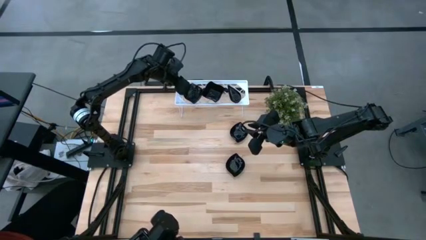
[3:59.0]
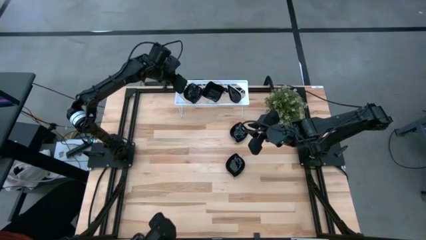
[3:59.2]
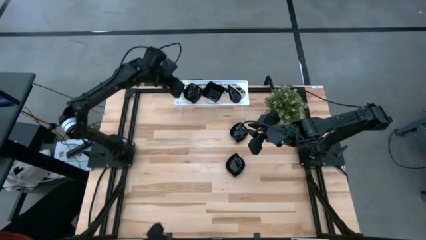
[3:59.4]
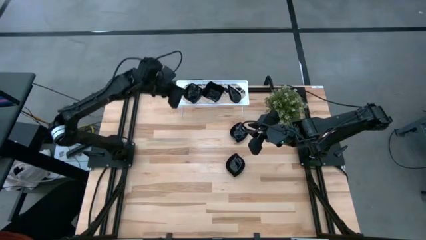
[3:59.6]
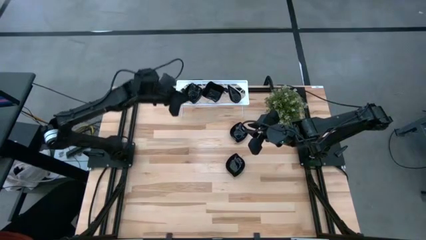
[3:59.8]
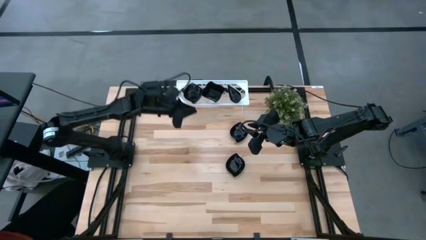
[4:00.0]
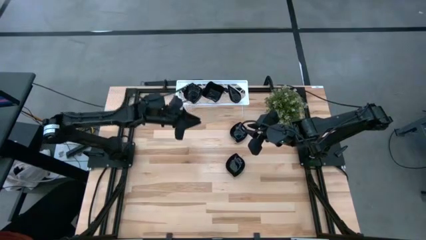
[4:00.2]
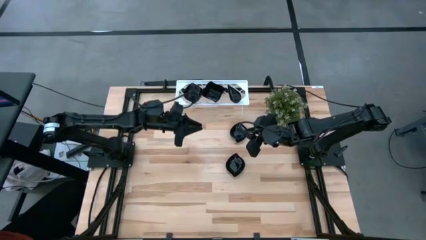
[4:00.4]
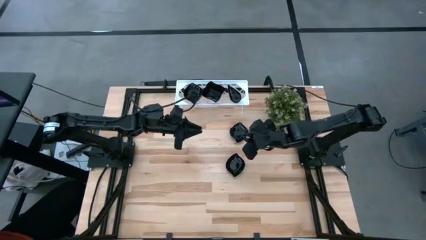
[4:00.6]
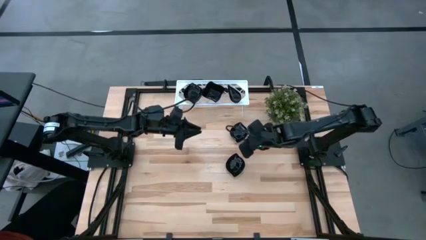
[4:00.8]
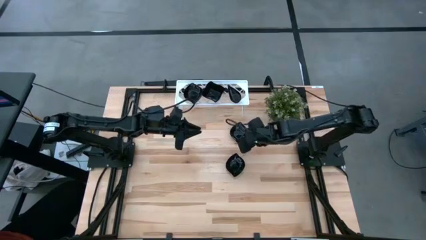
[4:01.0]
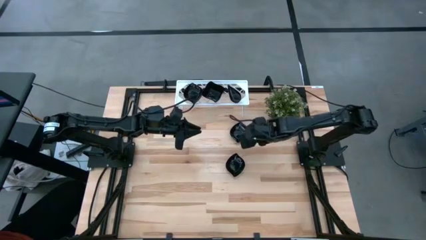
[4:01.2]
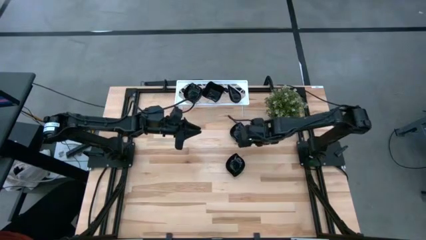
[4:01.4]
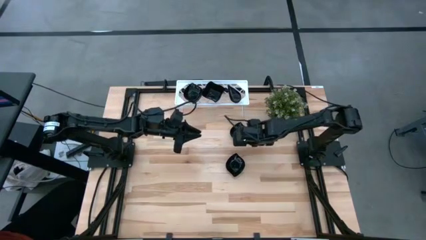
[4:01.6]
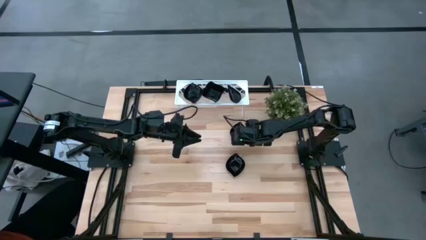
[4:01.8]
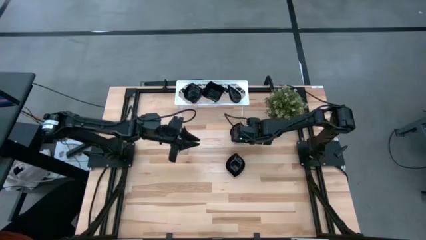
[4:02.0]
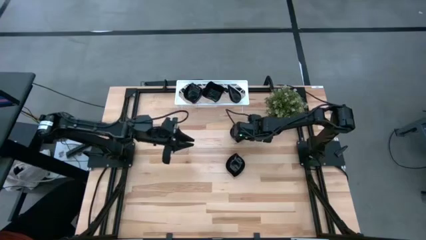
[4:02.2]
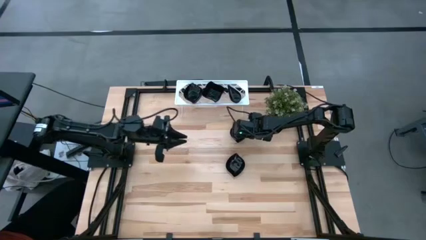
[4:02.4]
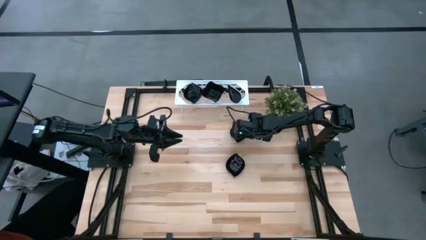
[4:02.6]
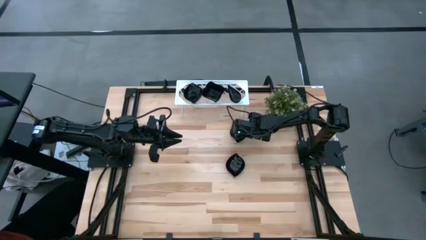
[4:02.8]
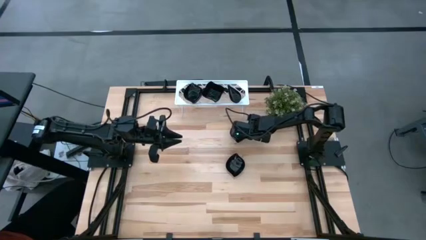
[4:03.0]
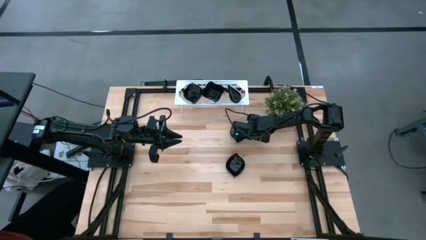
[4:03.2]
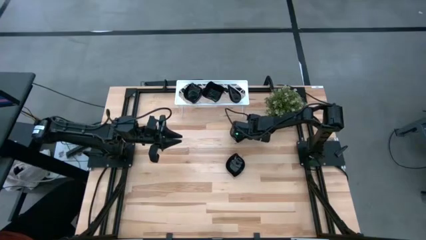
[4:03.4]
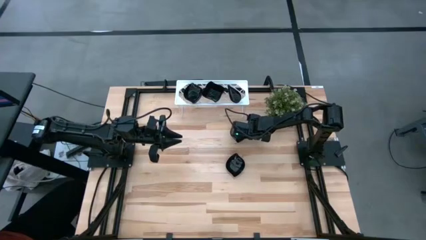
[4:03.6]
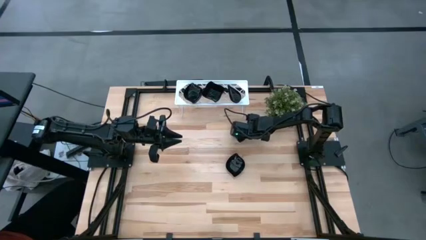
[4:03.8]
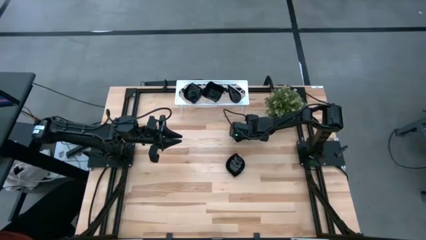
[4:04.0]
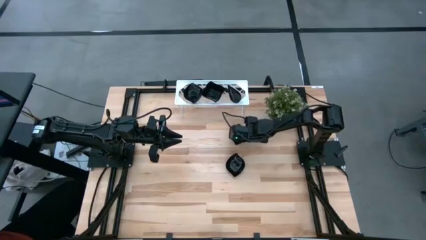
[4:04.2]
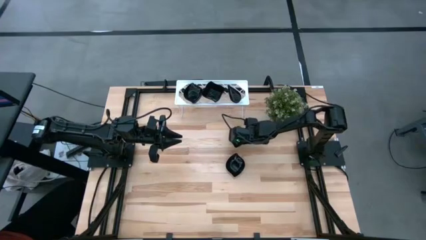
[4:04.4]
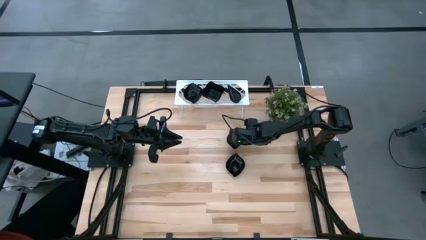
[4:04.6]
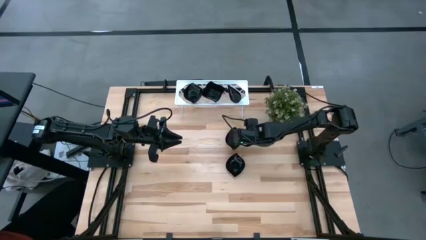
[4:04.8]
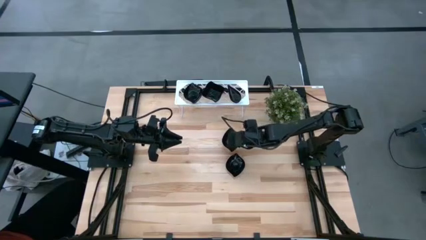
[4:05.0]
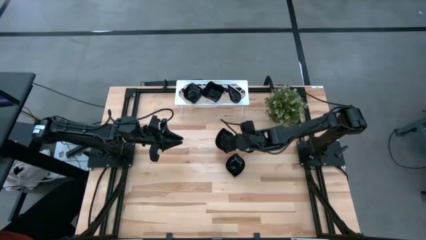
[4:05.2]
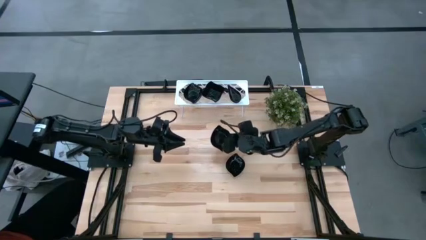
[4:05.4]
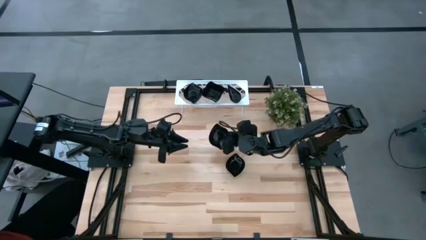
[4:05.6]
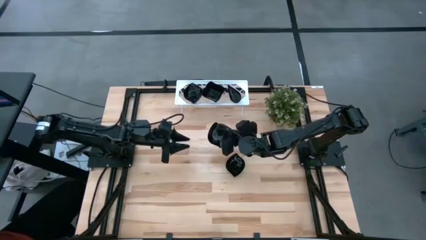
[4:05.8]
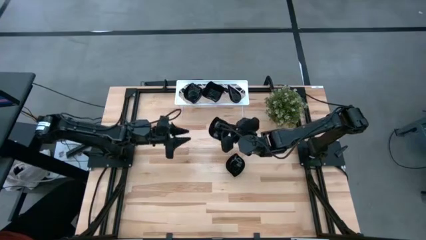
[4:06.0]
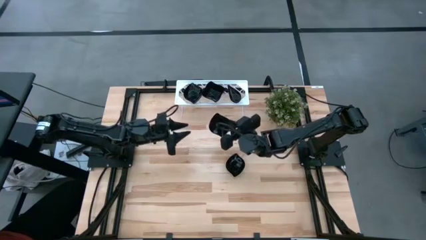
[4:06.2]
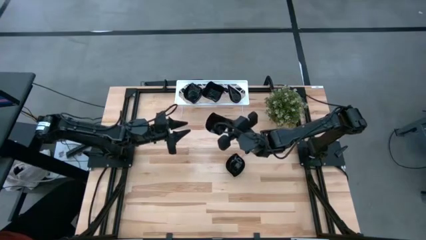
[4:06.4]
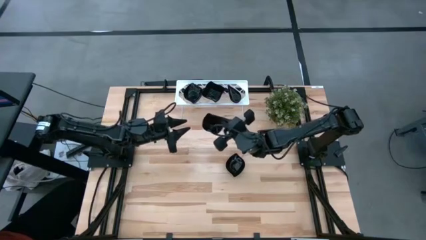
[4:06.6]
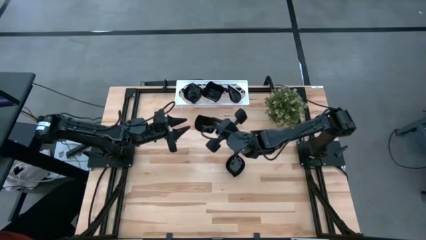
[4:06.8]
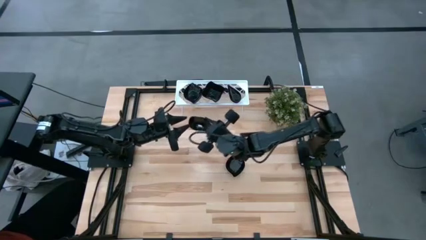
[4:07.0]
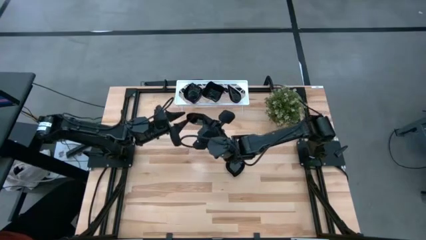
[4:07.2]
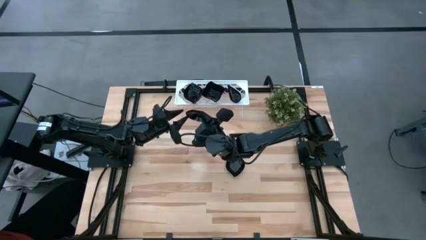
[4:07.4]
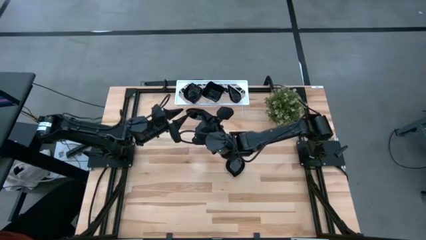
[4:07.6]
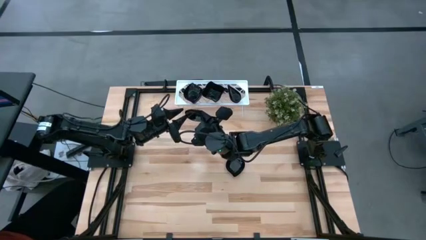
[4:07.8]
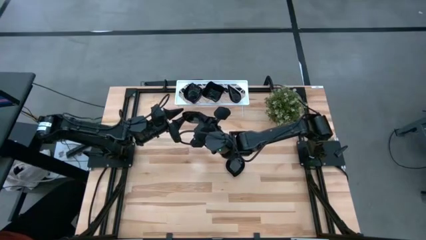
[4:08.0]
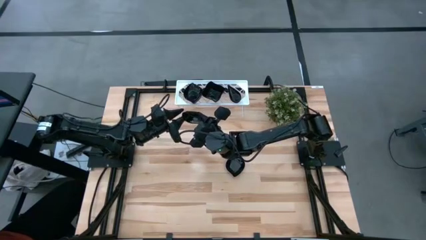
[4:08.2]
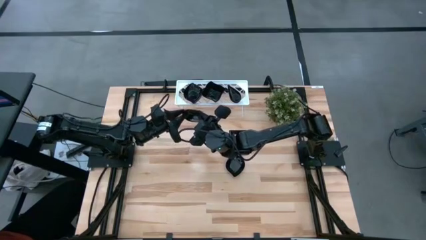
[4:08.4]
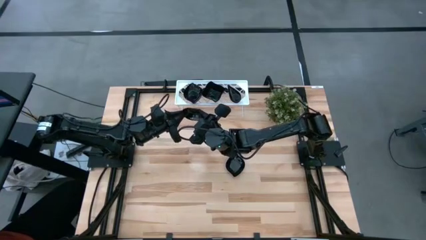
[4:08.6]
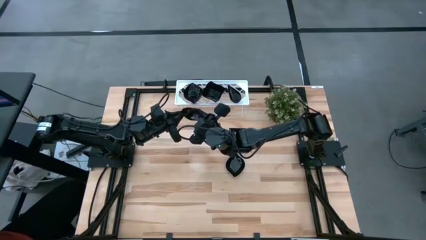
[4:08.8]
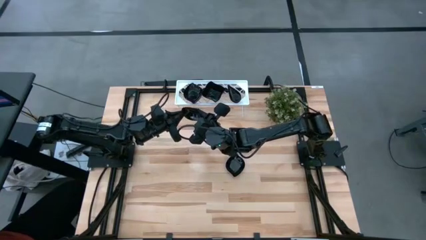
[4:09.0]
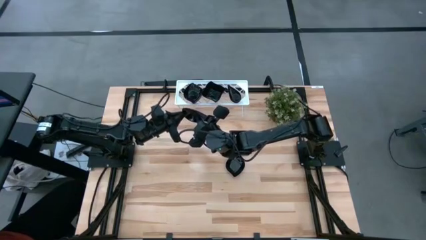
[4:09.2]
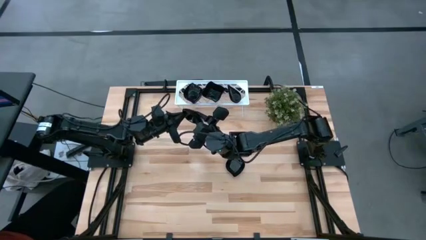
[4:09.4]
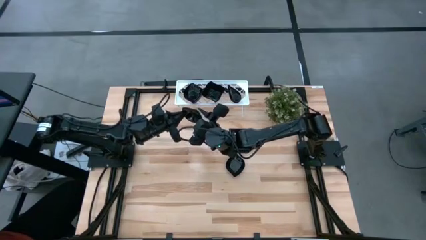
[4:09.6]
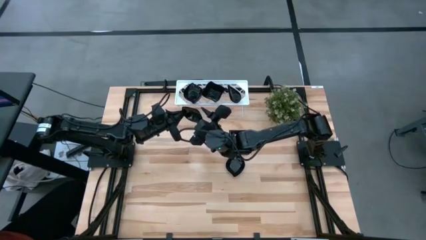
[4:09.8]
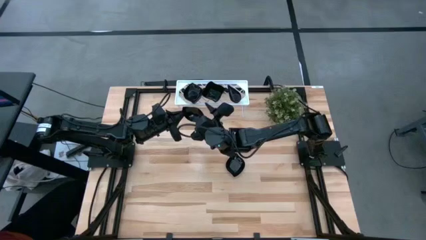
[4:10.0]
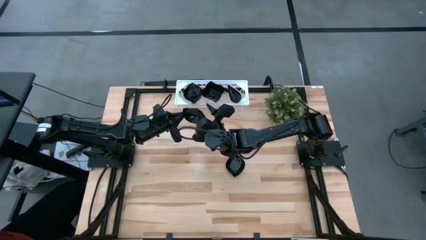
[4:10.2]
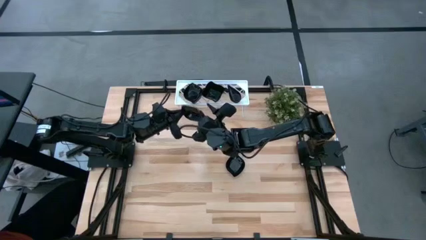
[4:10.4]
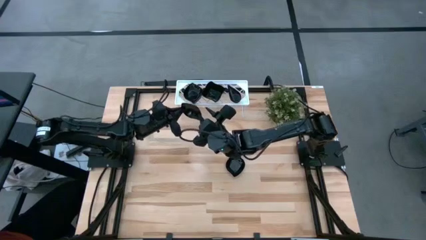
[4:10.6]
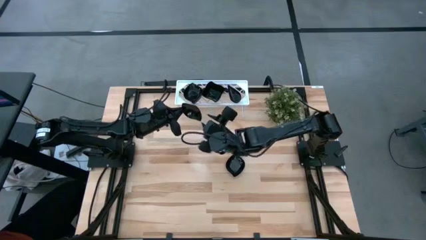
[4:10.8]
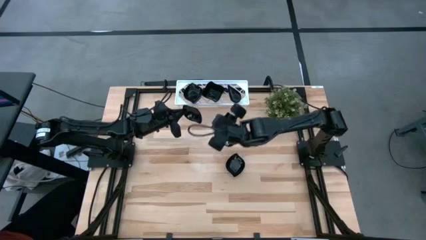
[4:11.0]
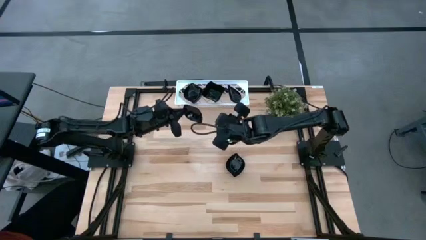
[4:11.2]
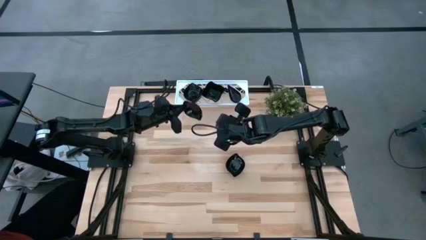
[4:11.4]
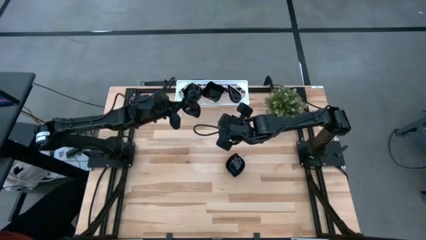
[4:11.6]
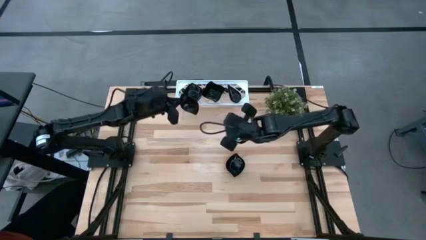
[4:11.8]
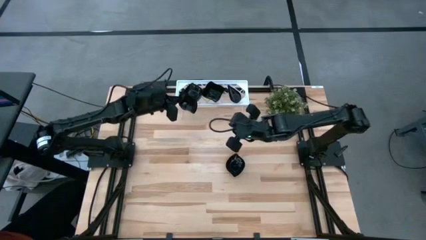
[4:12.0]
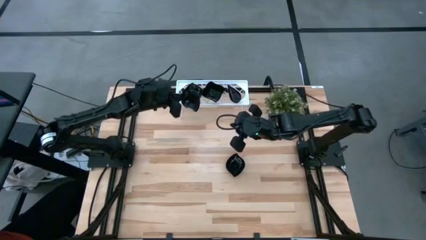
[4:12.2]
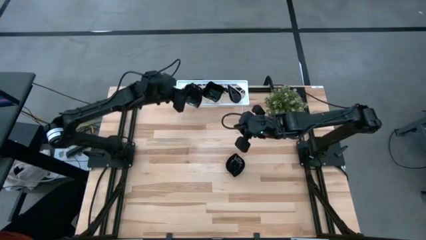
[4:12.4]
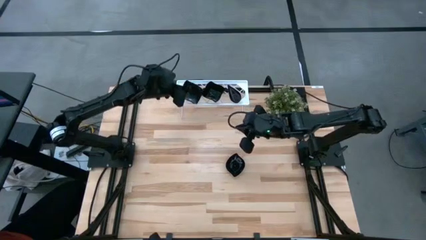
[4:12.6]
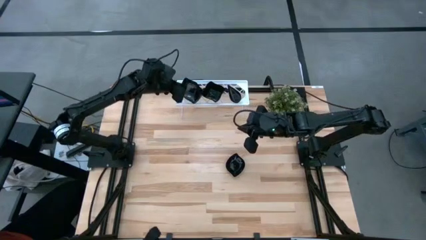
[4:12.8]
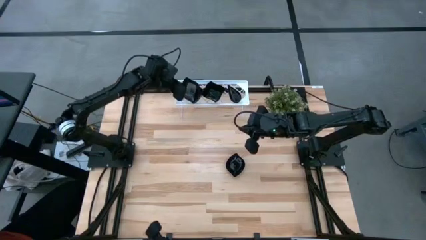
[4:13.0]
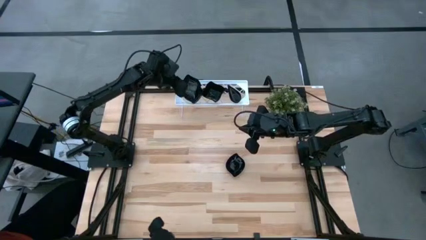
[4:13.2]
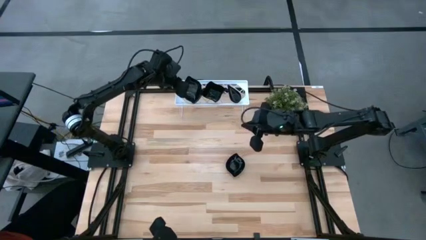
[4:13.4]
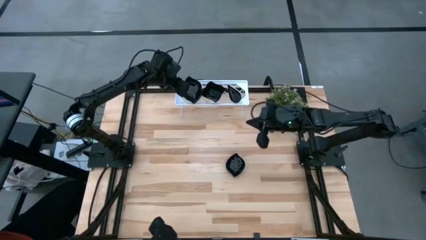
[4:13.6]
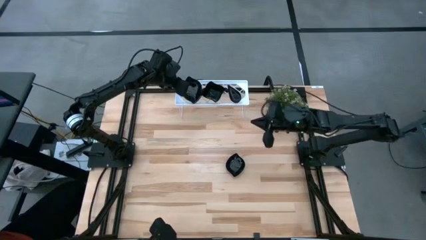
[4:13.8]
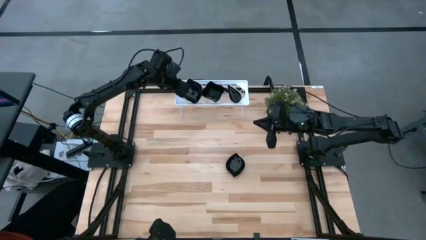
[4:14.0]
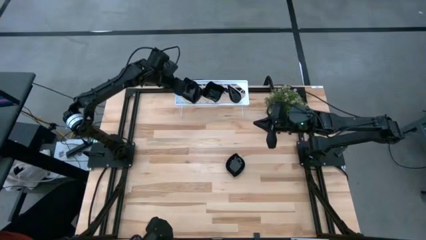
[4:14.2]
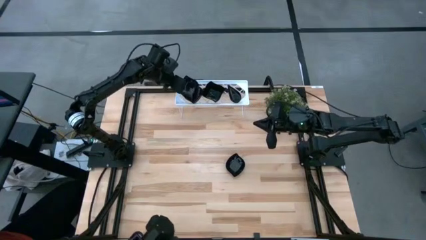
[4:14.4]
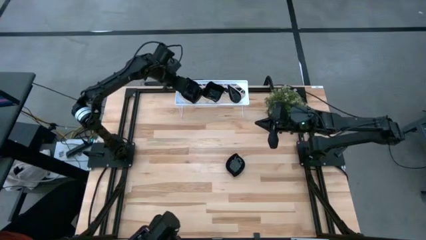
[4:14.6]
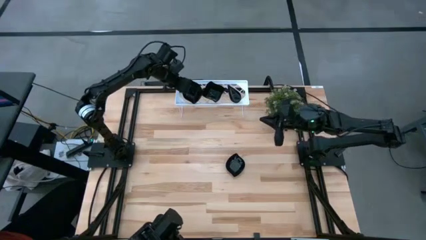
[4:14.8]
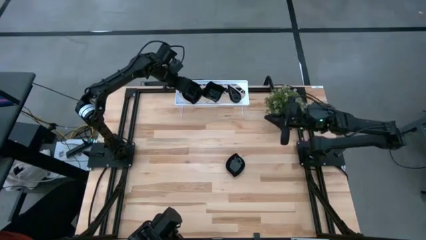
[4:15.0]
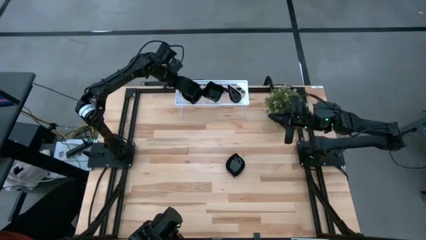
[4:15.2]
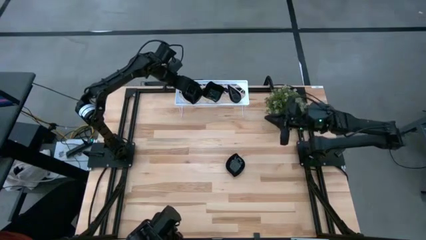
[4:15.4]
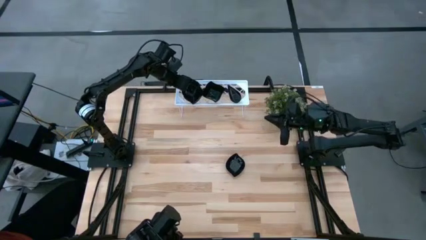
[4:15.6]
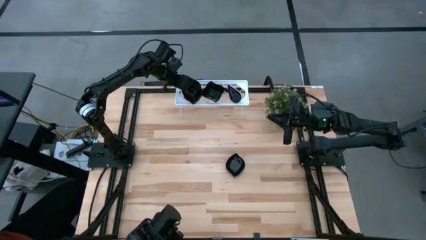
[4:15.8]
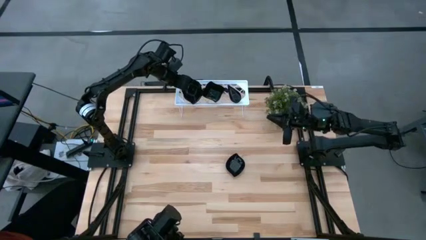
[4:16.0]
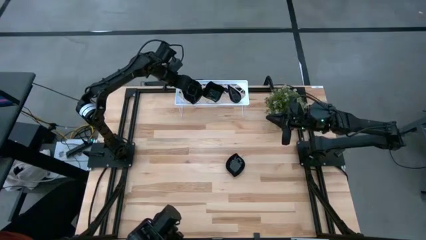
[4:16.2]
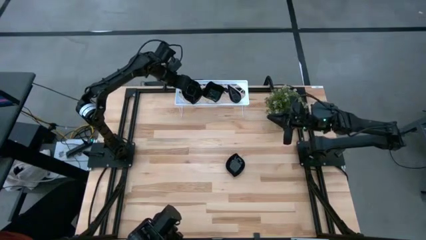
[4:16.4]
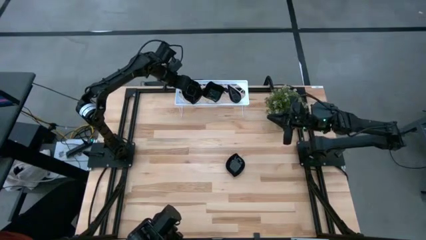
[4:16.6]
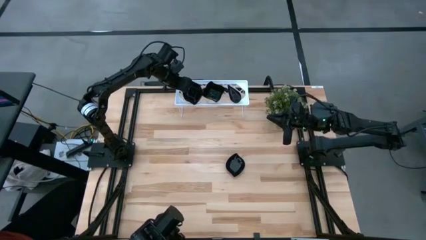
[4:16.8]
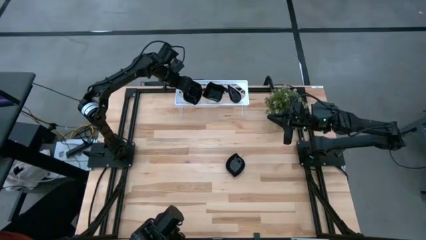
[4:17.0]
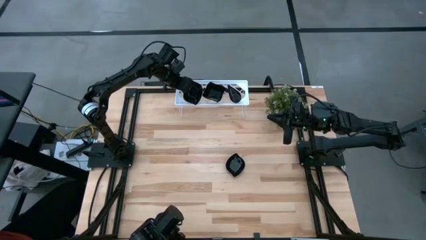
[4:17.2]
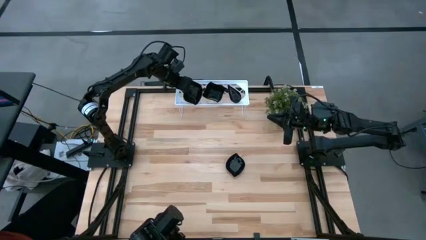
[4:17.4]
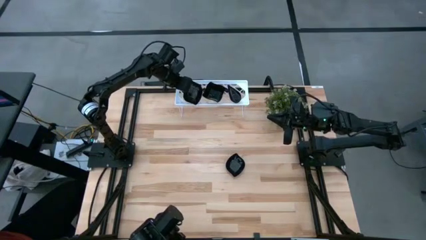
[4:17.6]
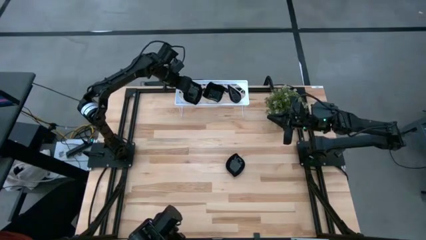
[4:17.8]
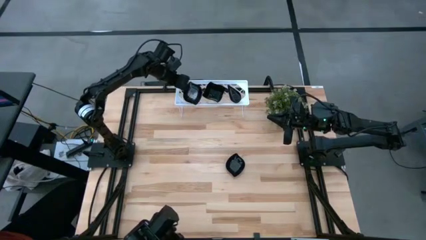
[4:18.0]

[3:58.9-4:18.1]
Task: Pick & Place Mini shaped plates
Stack the leaf-shaped plate on top of the other leaf-shaped plates on the shelf
